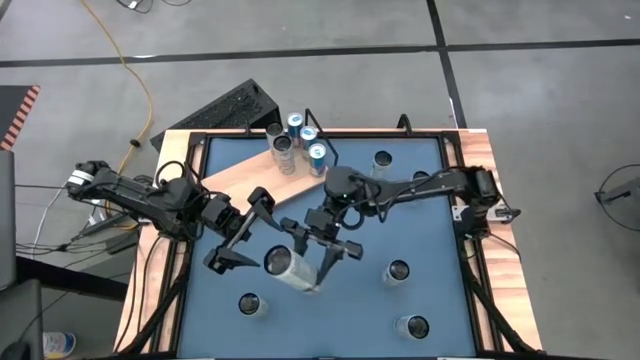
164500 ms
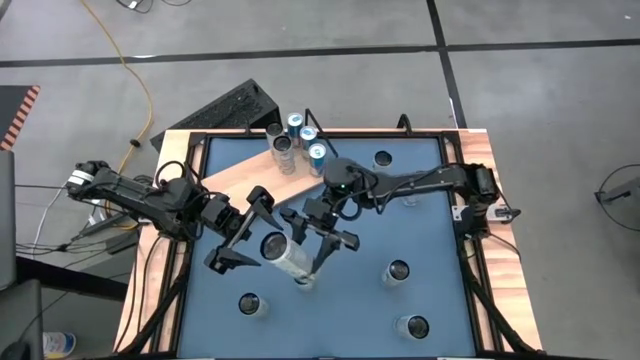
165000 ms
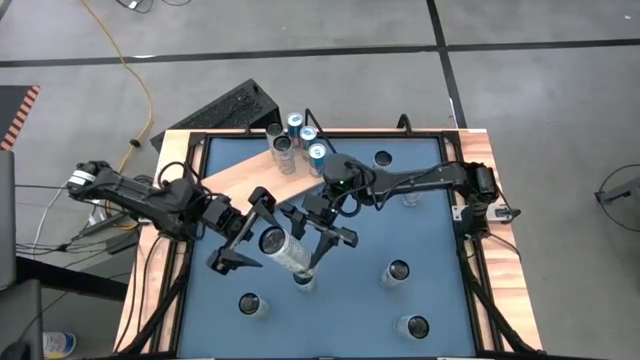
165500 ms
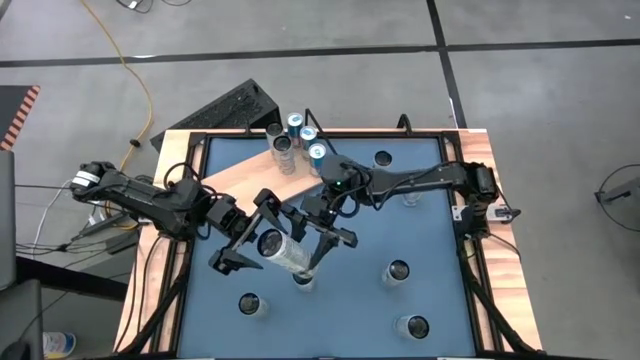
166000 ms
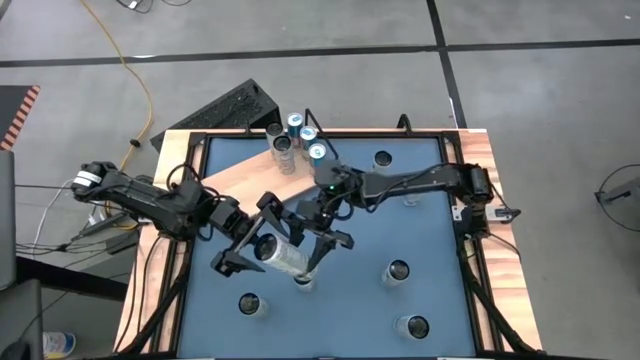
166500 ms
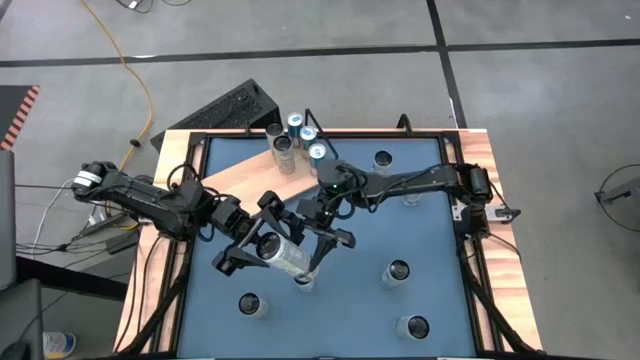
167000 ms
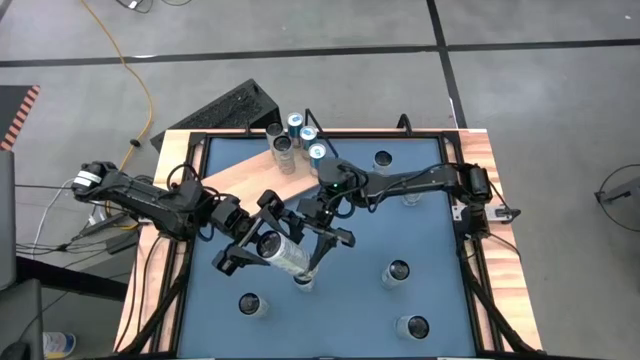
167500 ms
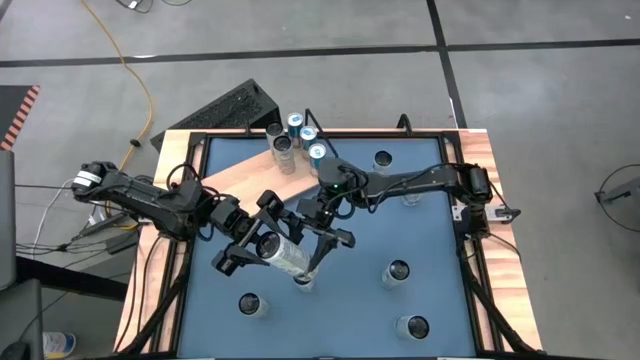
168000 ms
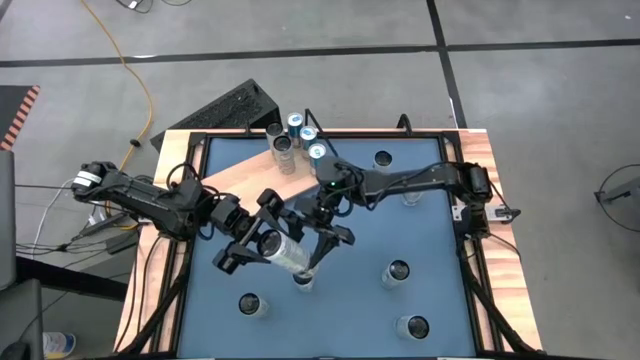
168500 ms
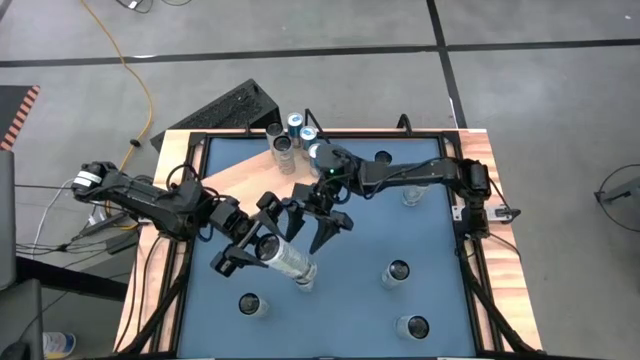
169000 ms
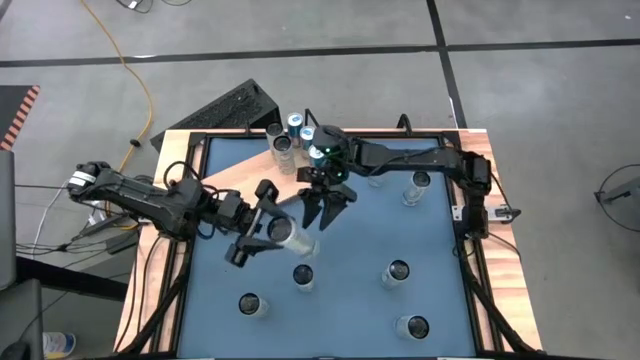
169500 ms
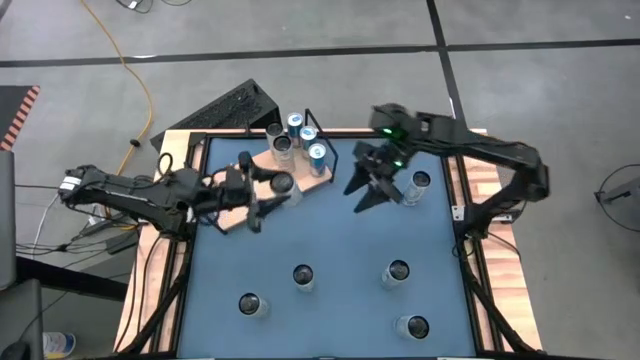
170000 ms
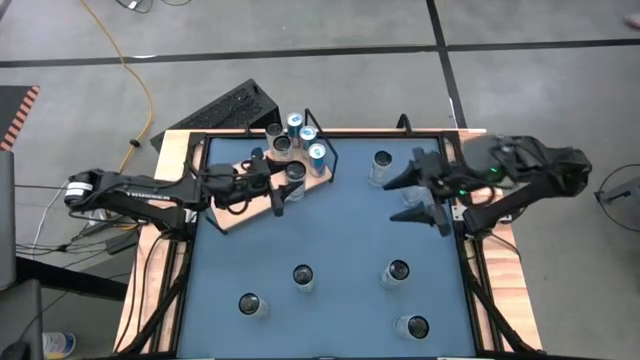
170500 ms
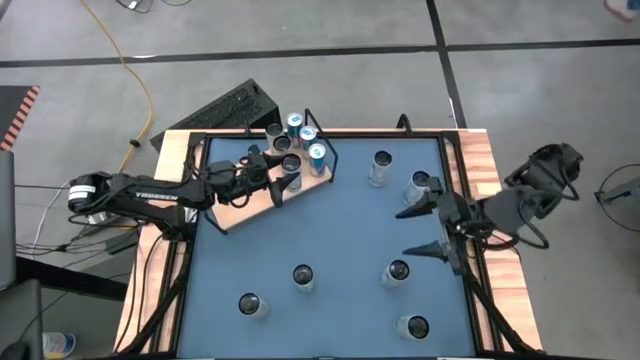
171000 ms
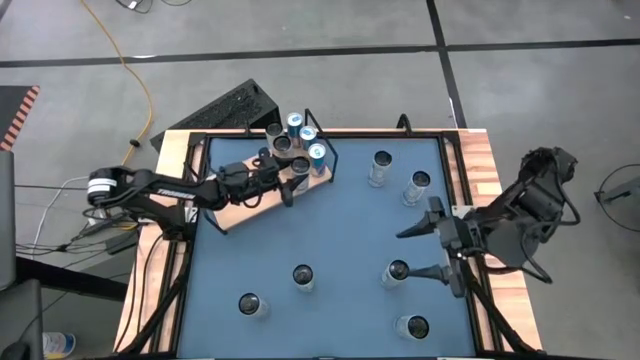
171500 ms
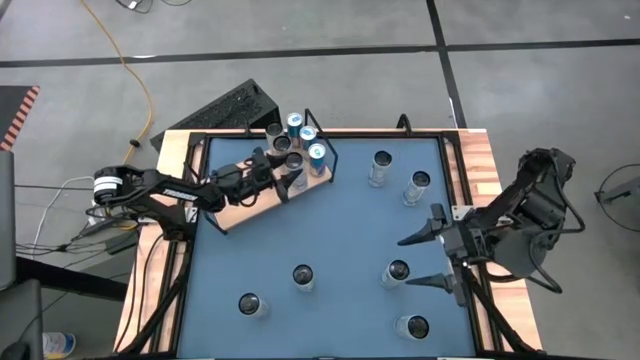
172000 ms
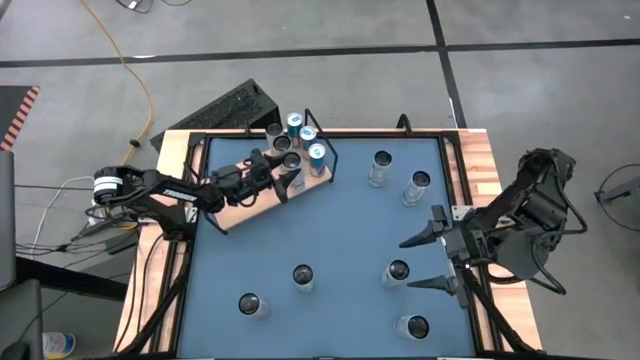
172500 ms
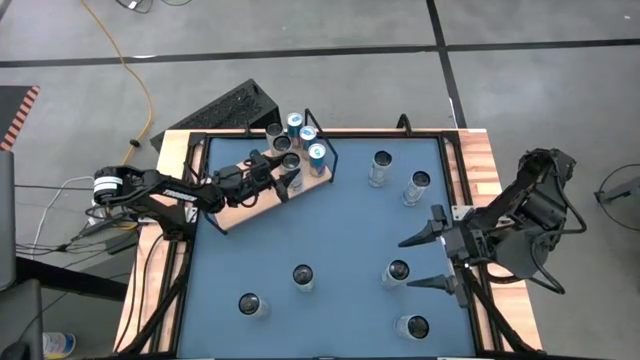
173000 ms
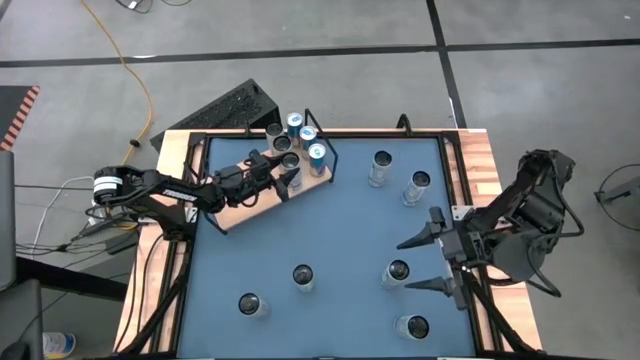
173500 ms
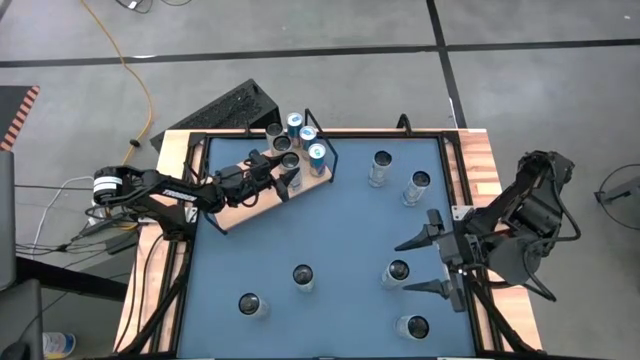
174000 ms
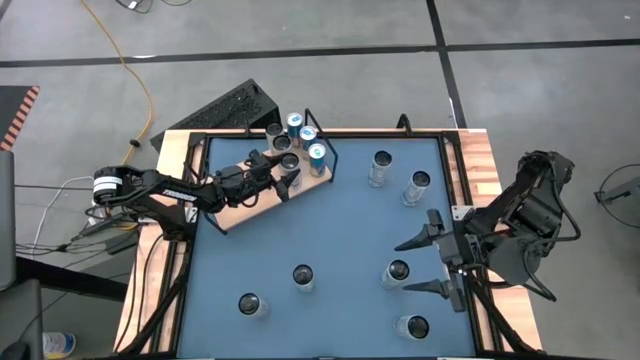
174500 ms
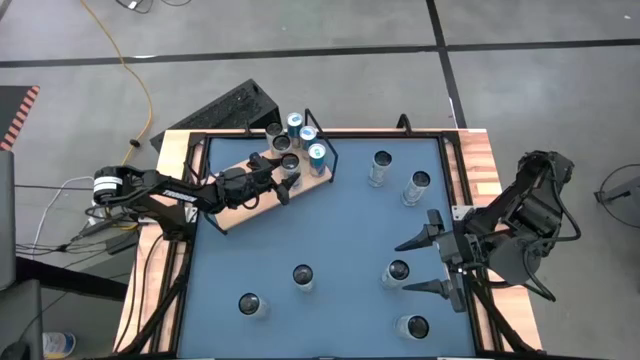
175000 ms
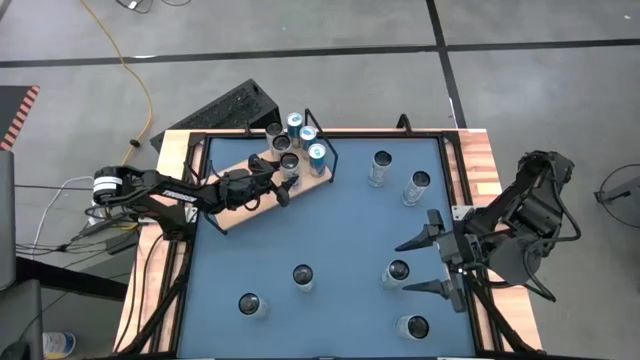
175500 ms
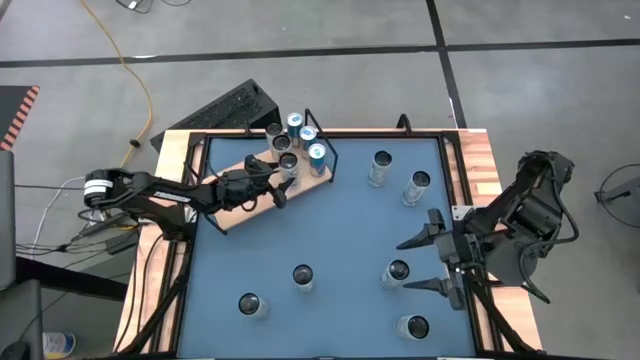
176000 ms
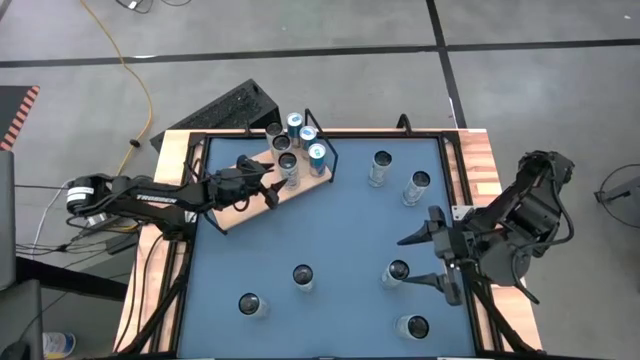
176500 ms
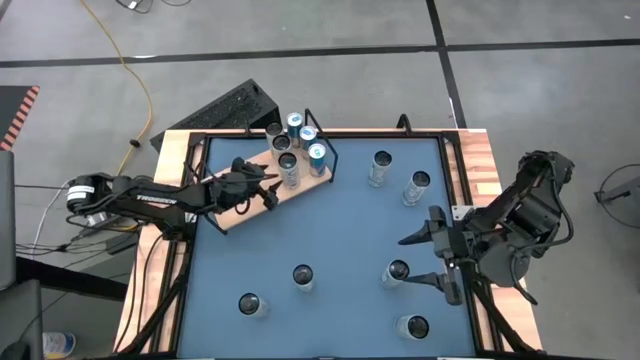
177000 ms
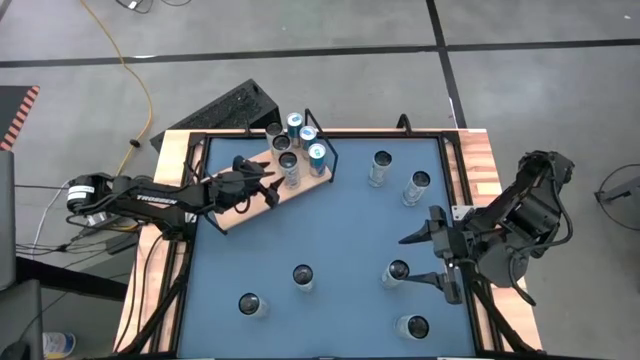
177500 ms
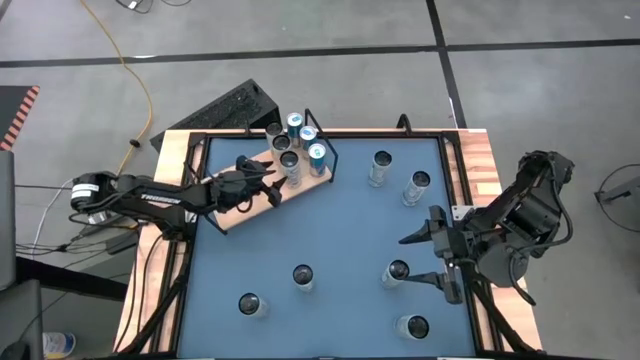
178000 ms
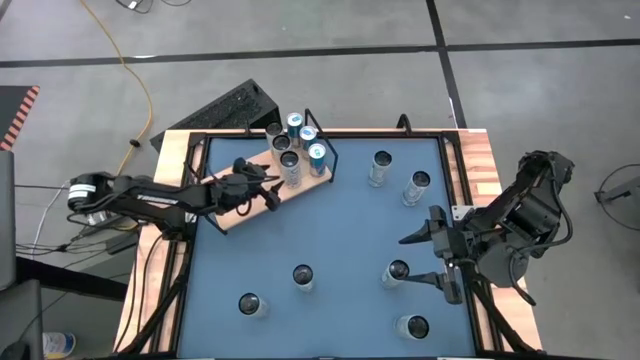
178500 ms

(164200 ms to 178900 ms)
Task: Place canned beverage on shelf
Put the white and yellow soda can on the shelf aligned with the other white and yellow soda cans

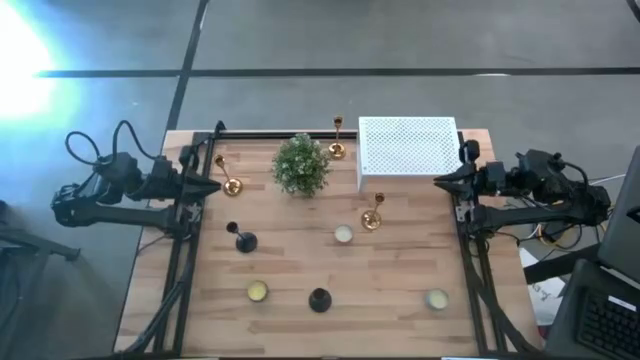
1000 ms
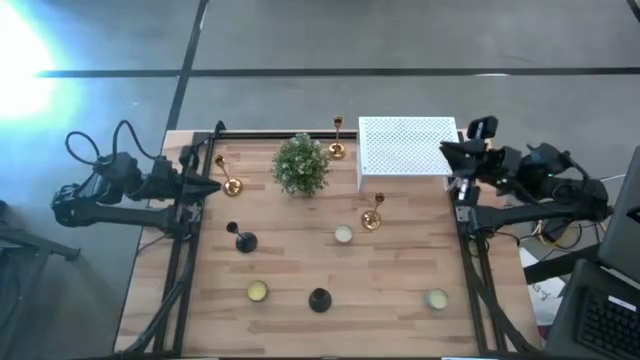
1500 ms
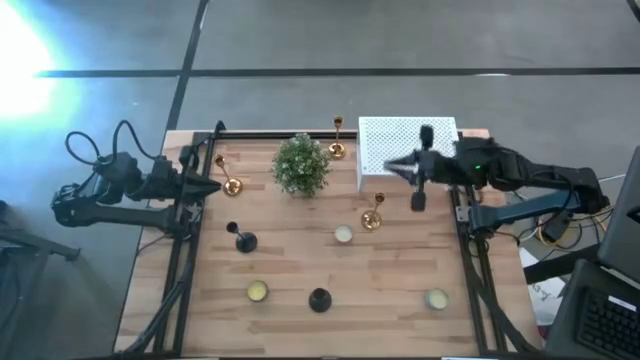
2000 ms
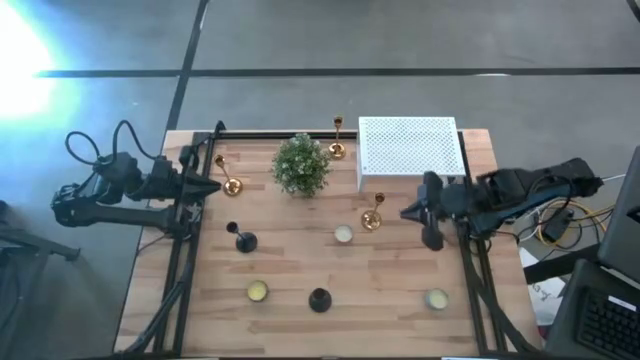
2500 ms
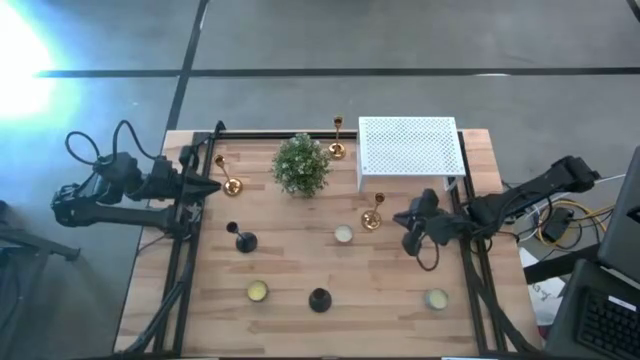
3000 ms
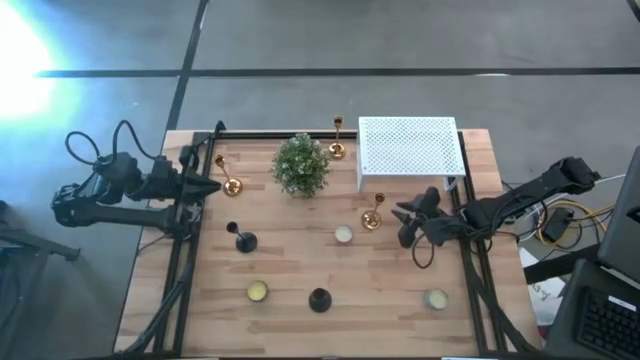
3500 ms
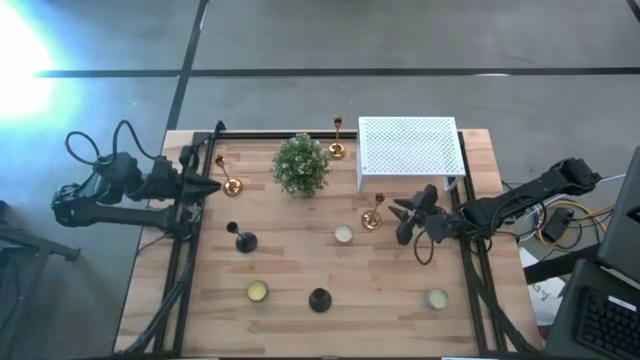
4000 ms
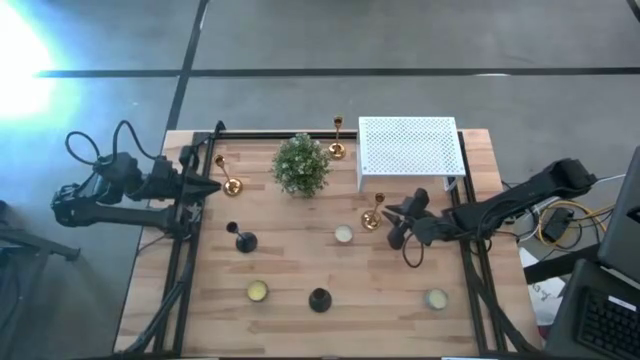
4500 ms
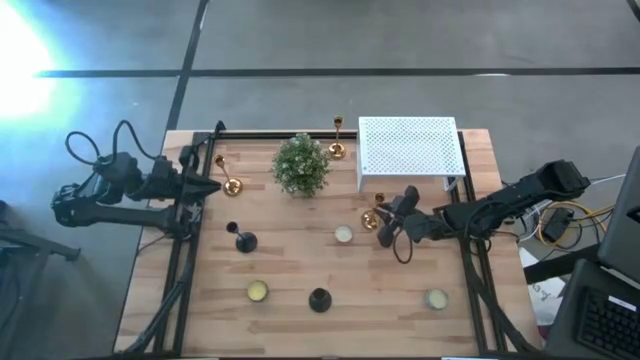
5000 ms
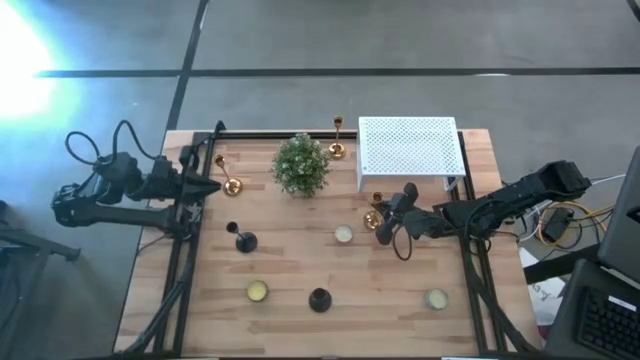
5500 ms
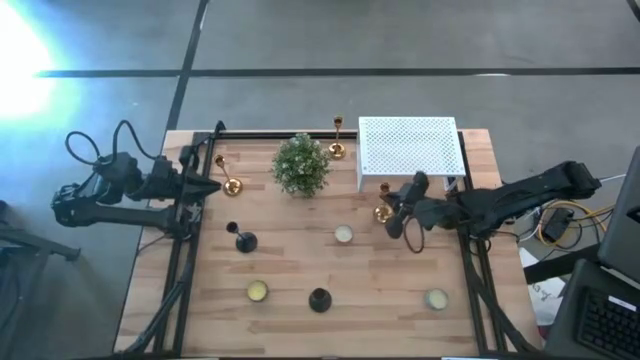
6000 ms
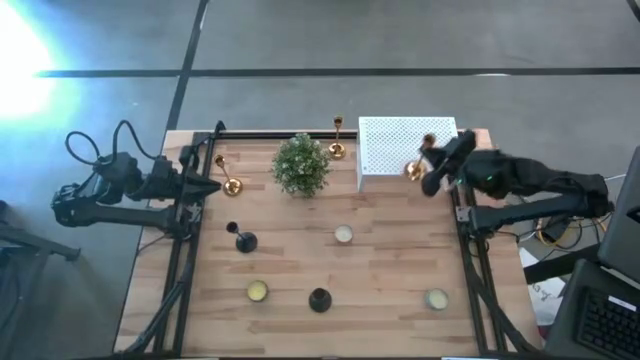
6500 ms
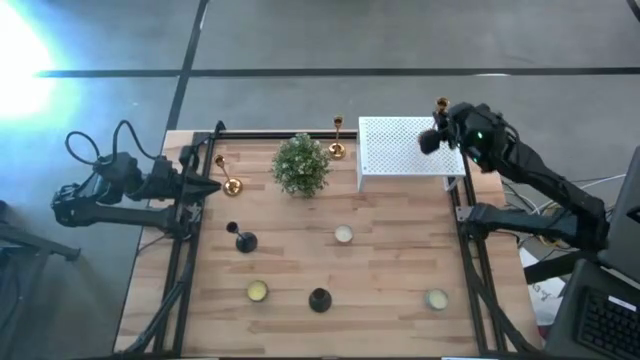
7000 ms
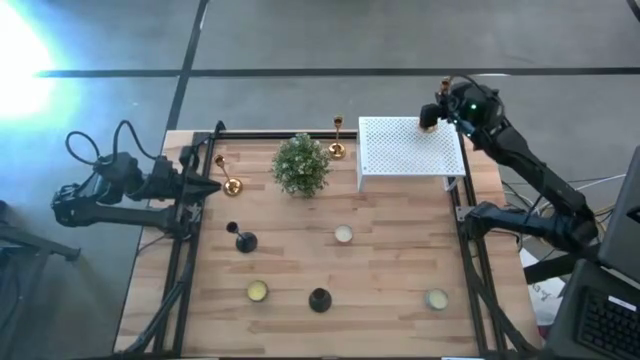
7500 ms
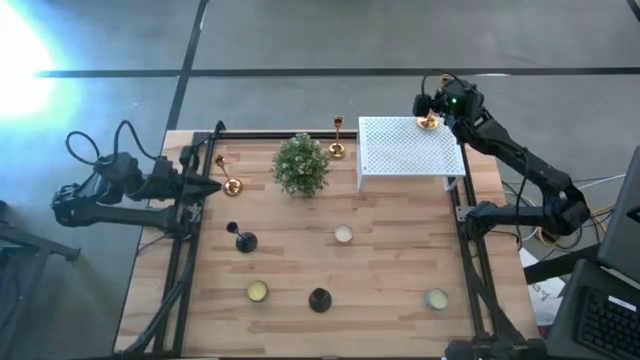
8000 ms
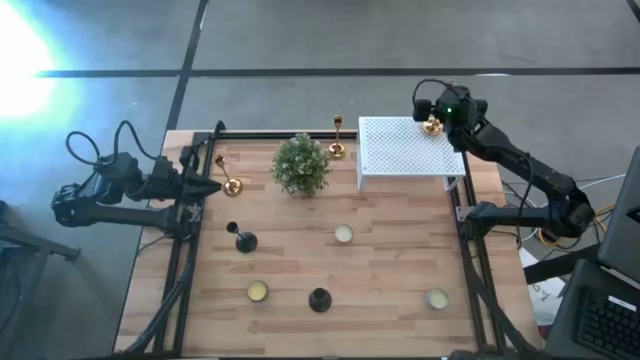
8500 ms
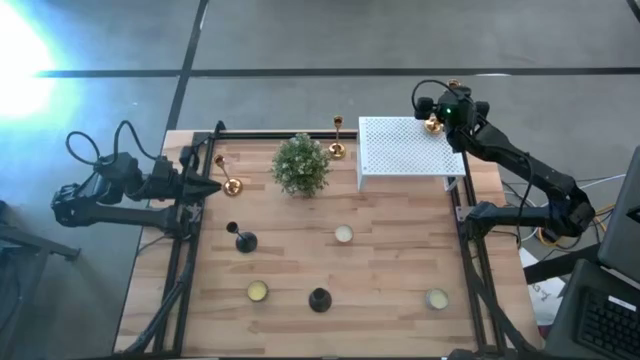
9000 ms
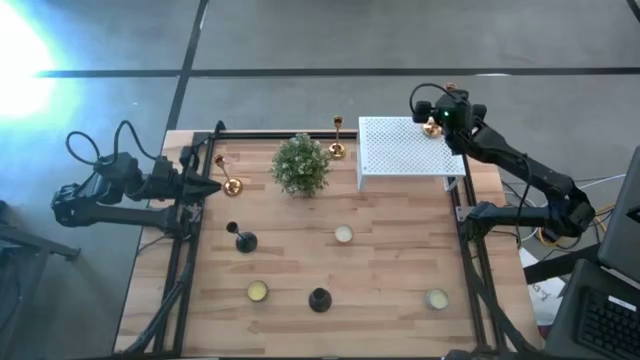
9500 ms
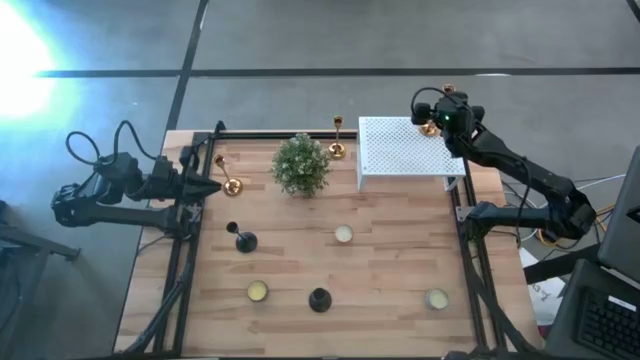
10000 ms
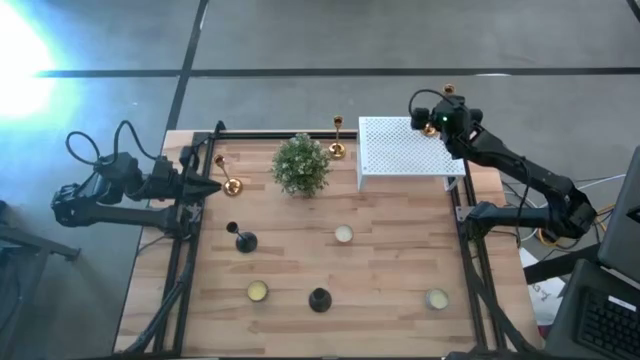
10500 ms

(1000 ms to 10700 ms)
Task: Pick & Place candle stick holders
Put the bottom gold candle holder on the shelf
